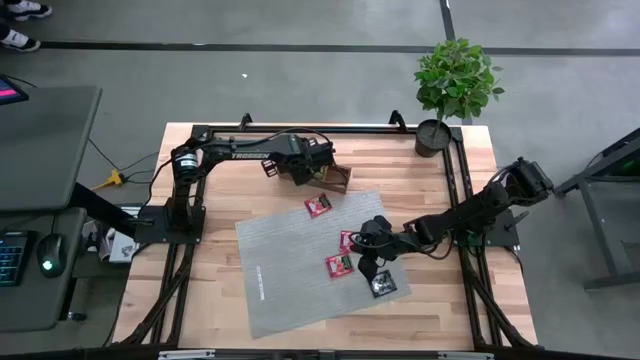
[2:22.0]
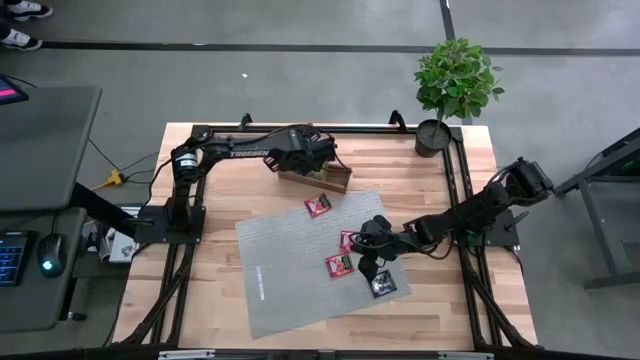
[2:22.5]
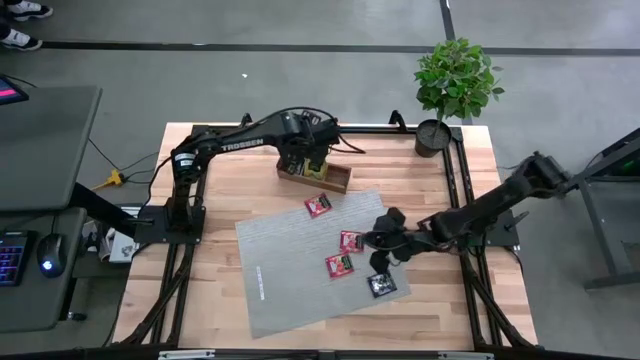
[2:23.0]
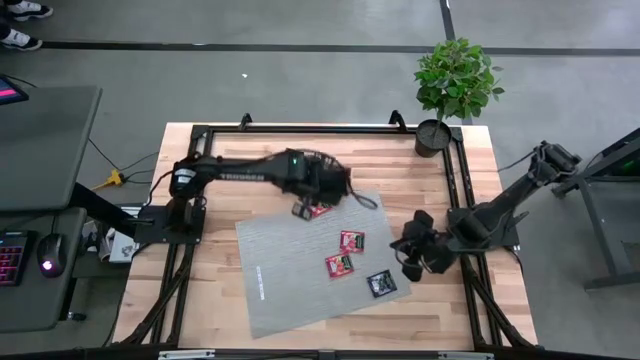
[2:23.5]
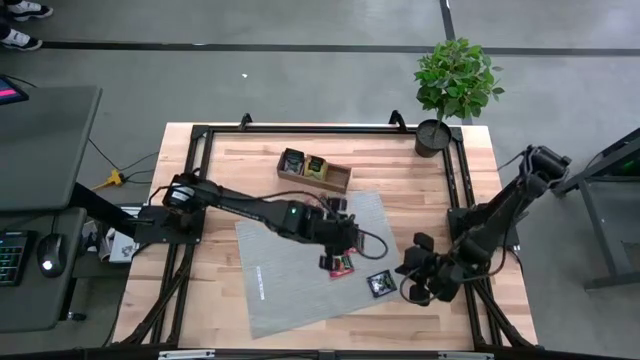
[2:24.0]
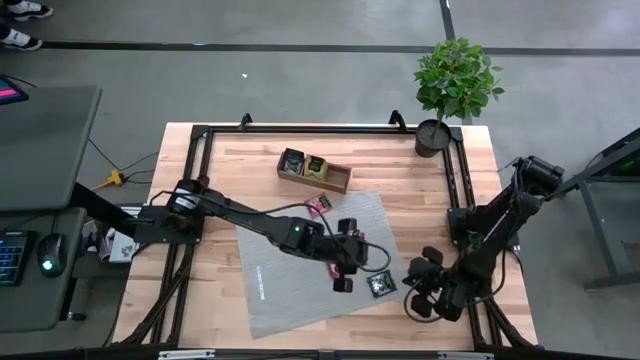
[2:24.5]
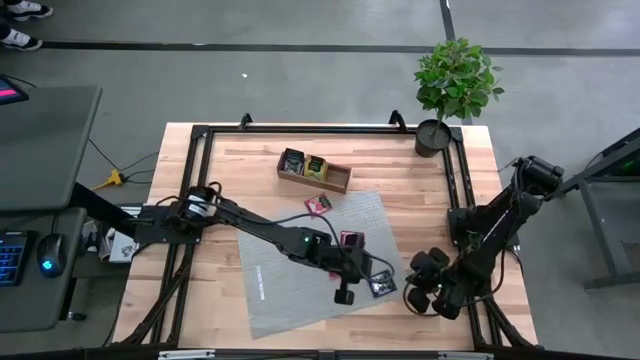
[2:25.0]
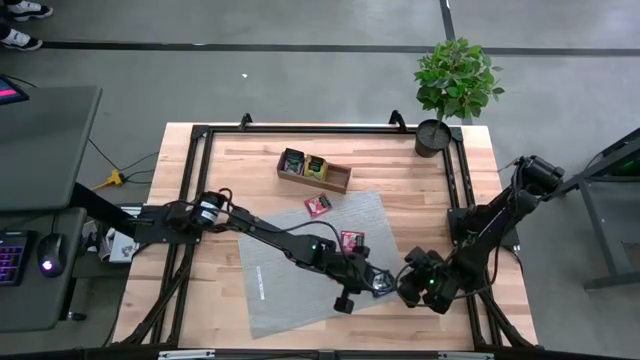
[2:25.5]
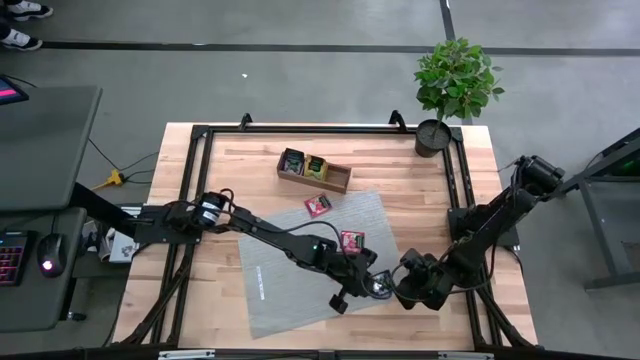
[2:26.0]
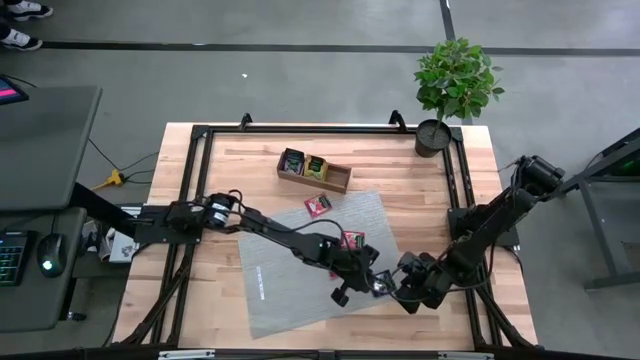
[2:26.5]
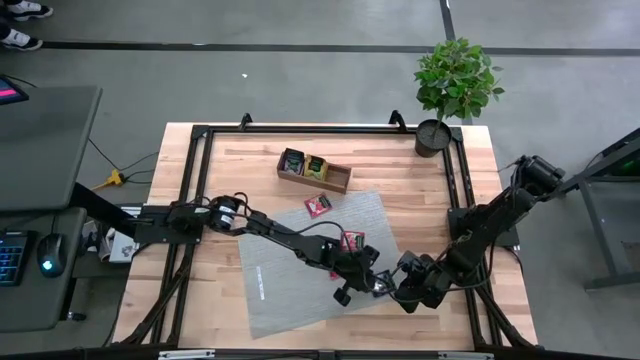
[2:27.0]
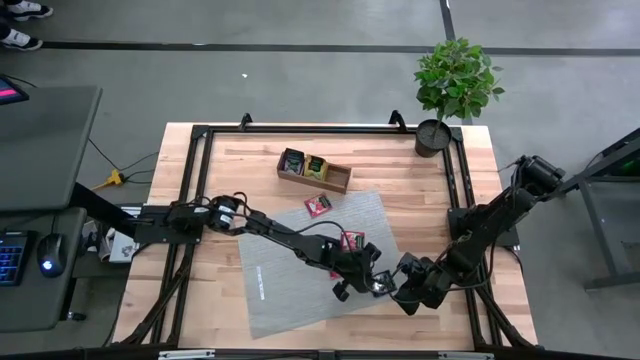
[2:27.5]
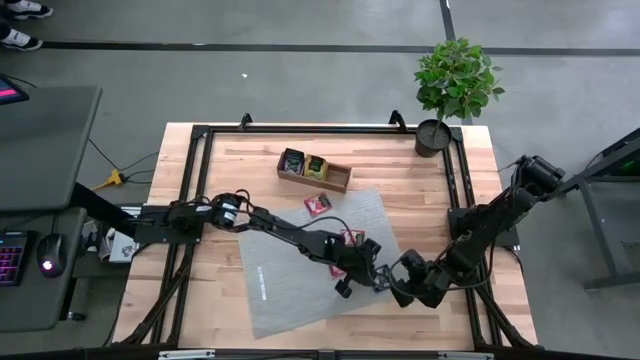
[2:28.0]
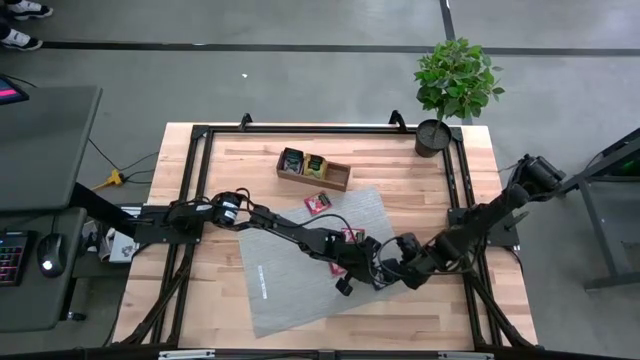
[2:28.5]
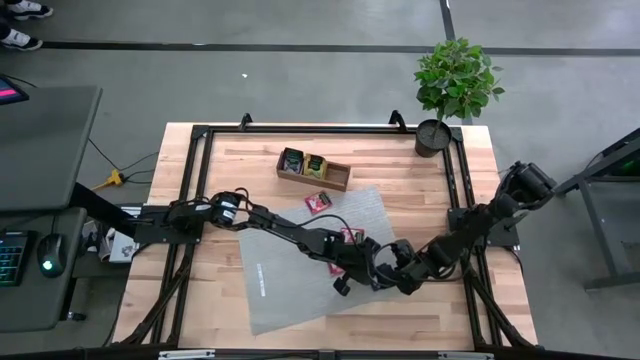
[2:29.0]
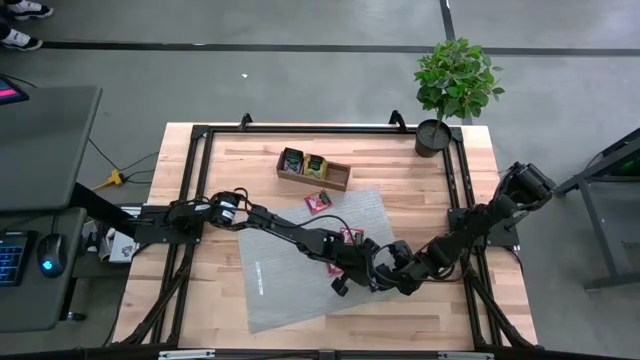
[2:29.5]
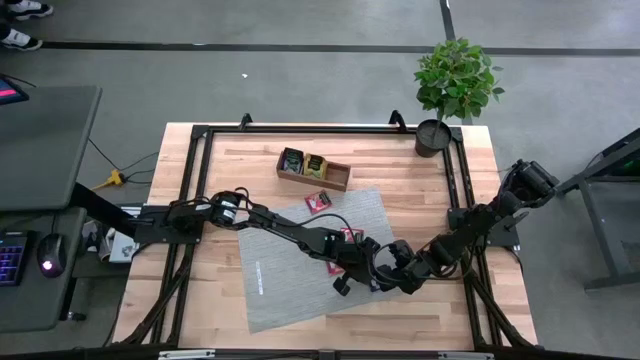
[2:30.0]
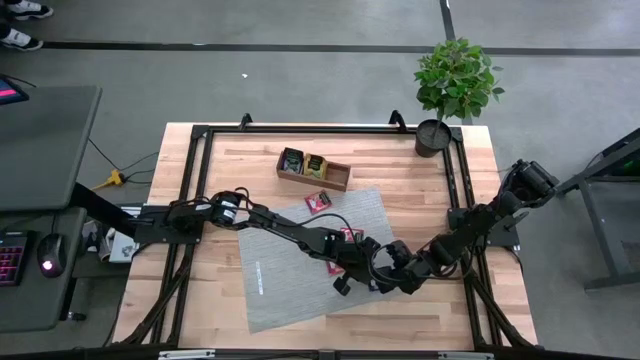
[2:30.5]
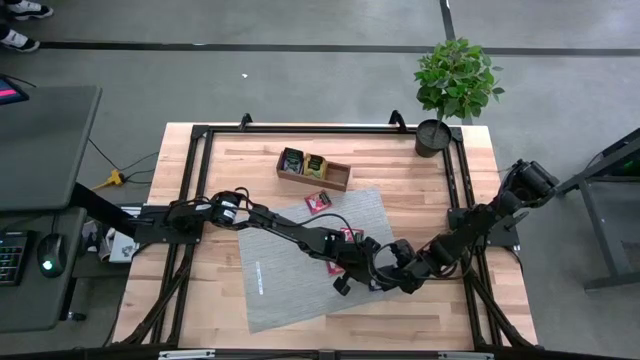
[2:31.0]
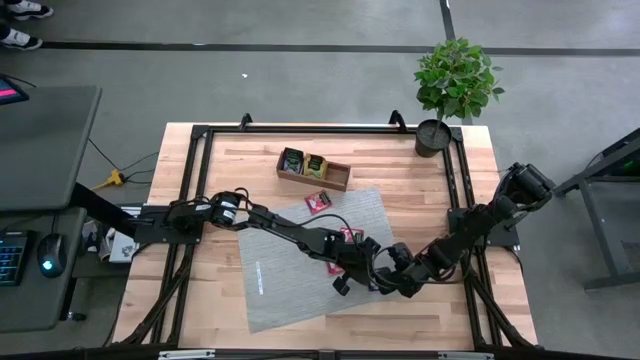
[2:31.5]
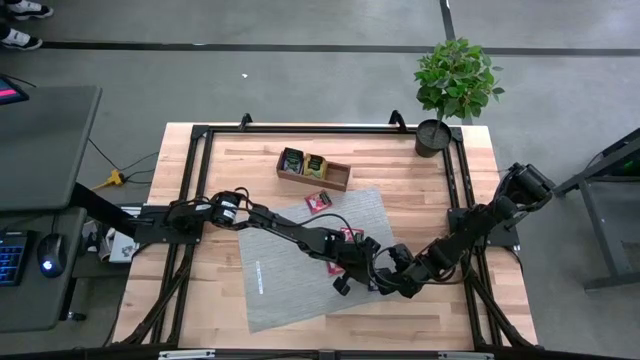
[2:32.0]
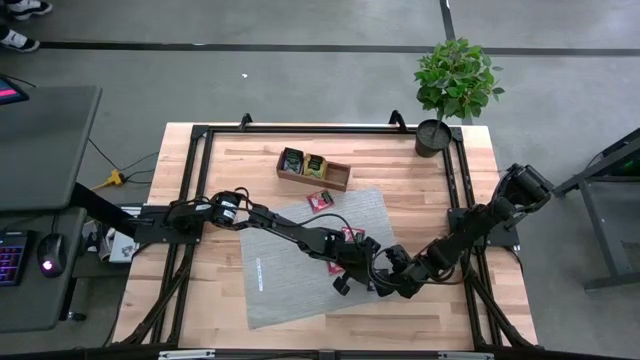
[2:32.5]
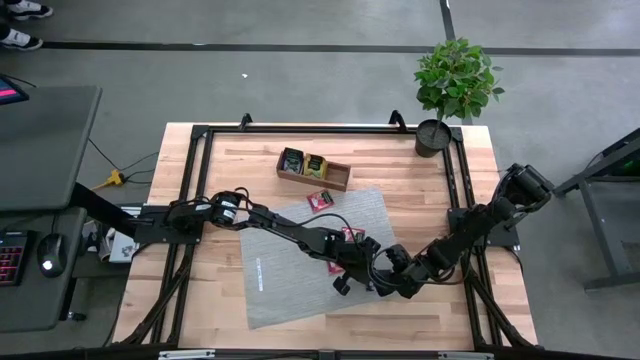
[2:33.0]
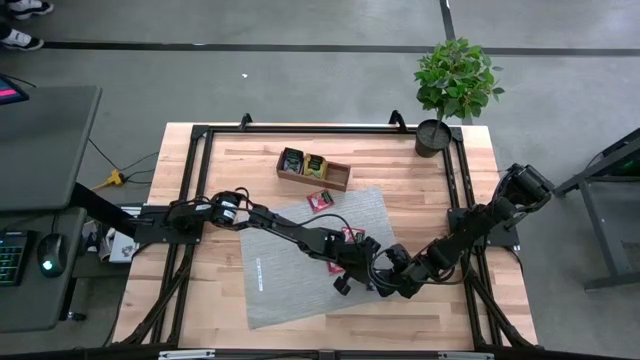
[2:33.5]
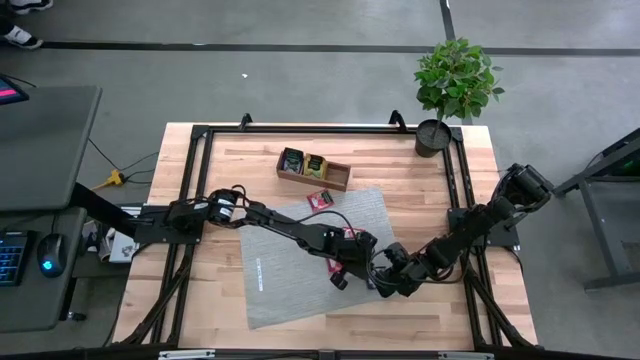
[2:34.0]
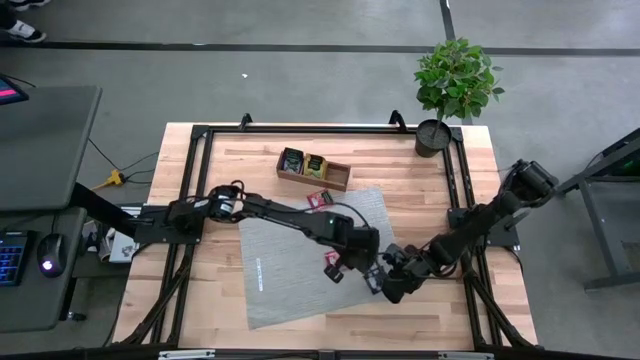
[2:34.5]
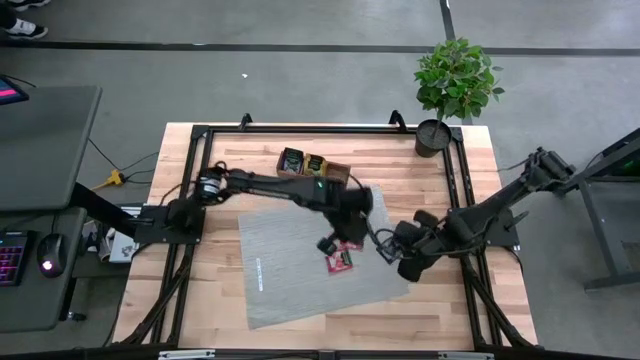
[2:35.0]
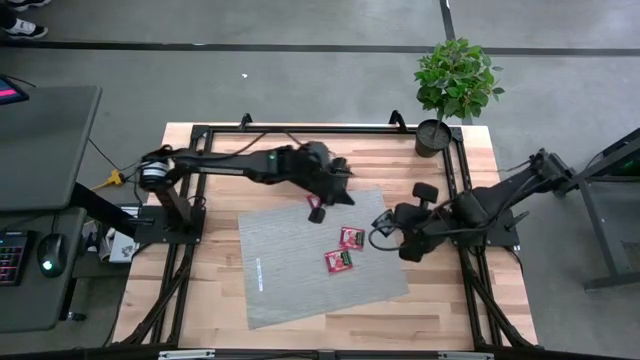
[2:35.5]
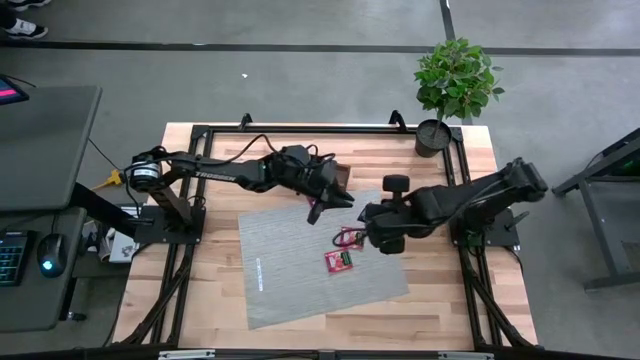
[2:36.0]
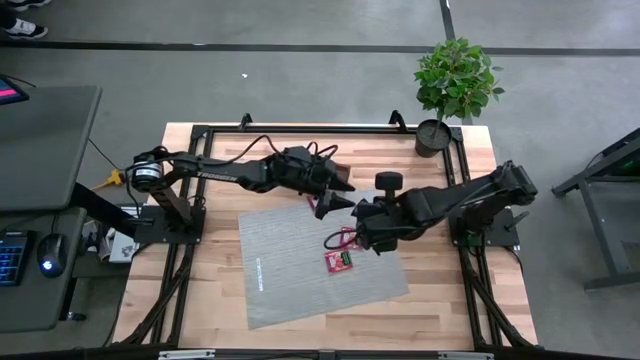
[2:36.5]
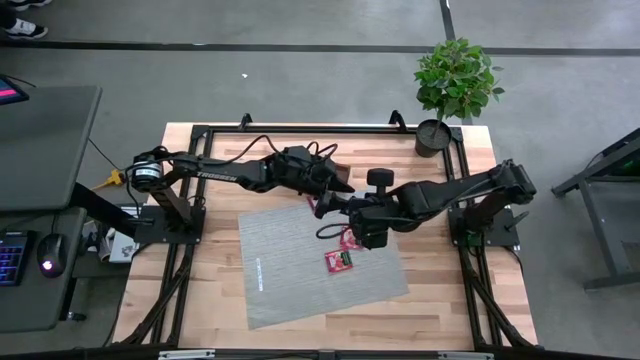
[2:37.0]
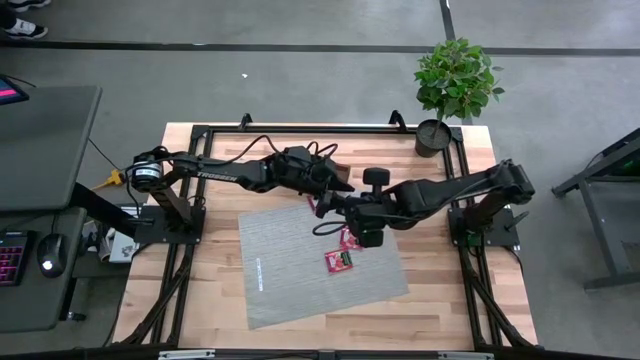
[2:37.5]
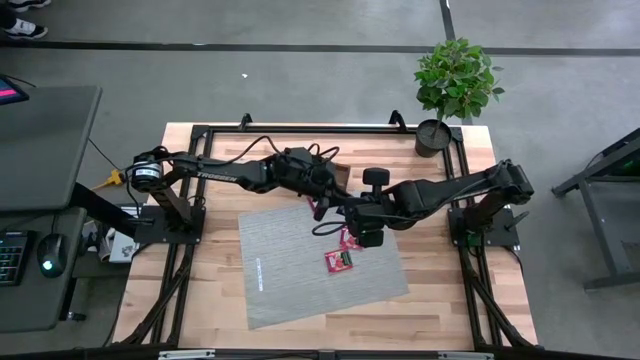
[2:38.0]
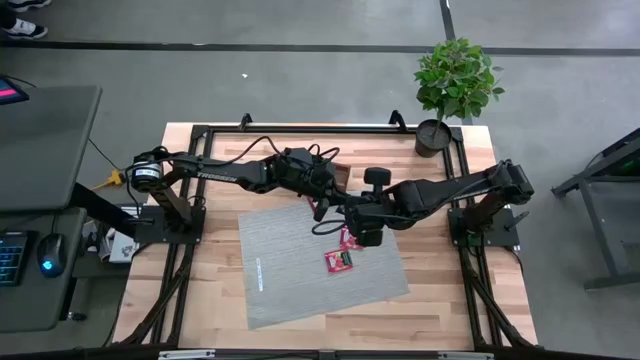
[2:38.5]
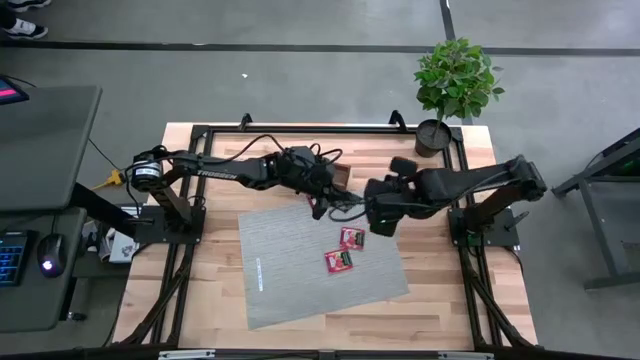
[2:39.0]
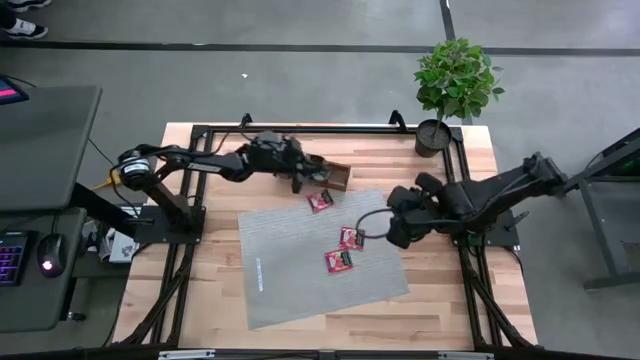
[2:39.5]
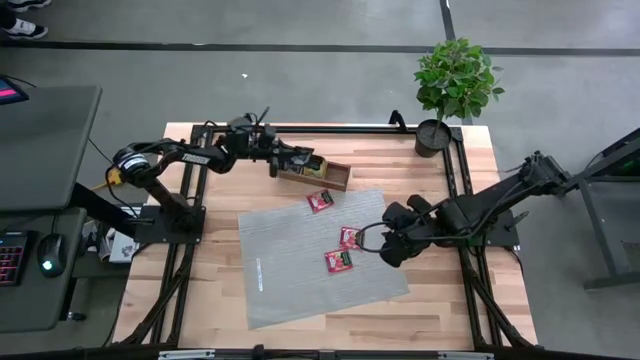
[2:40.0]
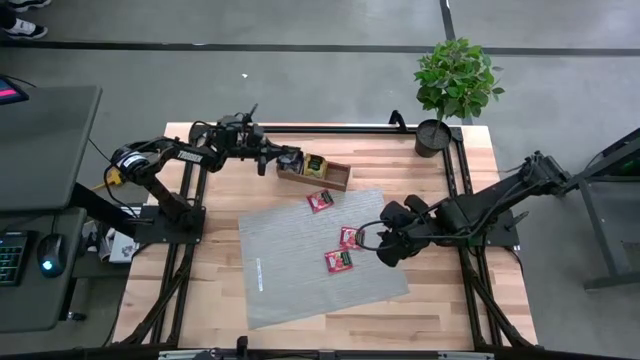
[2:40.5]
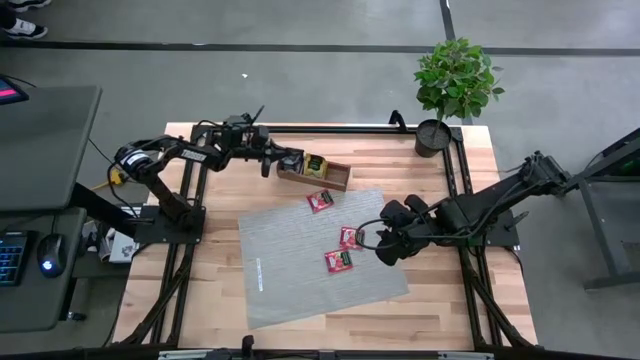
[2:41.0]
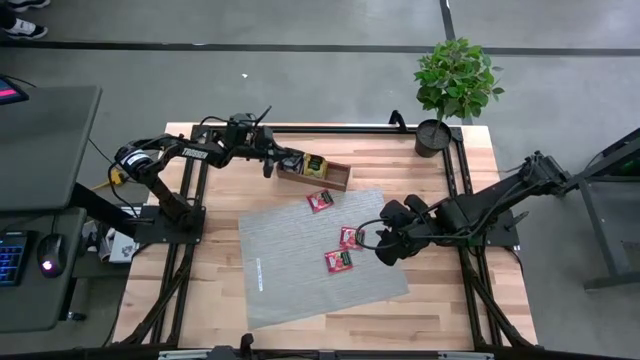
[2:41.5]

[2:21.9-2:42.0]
Task: Pick & Place Tea
Put the purple tea bag into the left section of the wooden organizer
